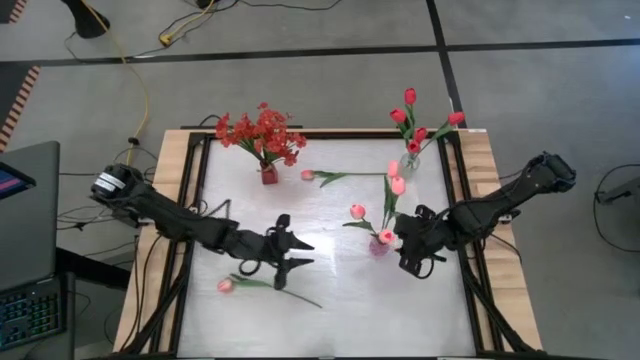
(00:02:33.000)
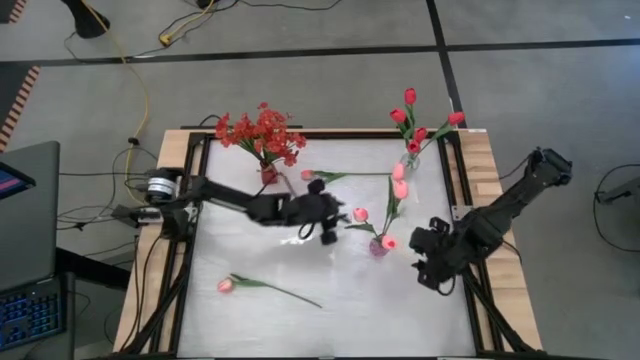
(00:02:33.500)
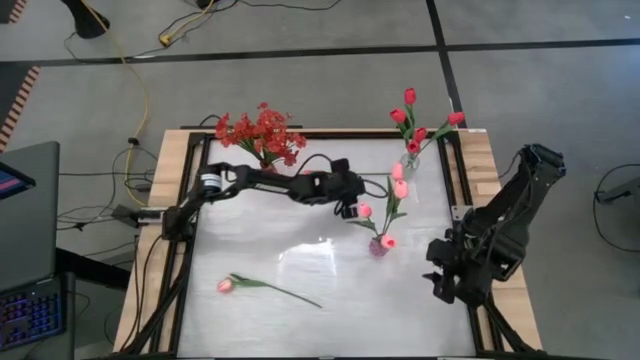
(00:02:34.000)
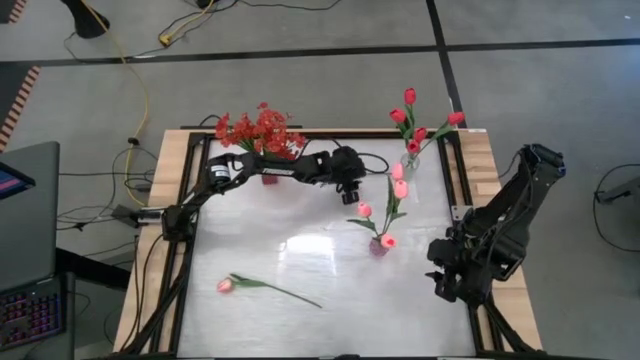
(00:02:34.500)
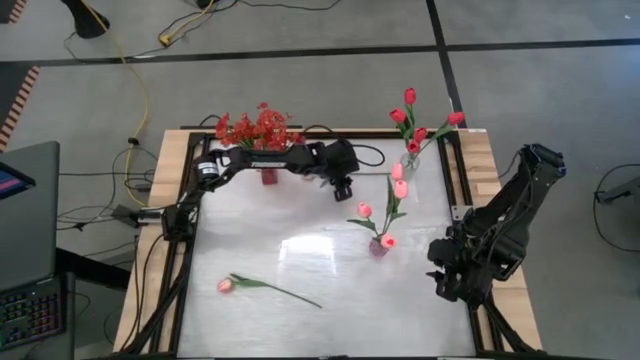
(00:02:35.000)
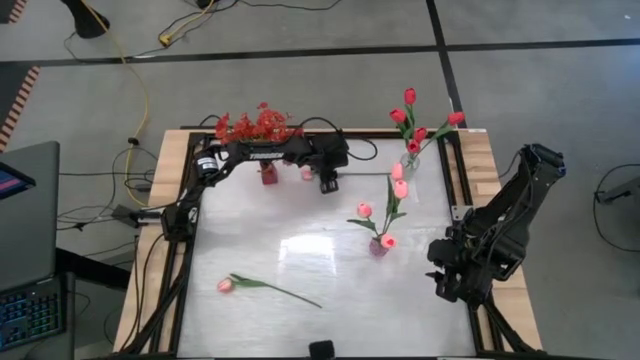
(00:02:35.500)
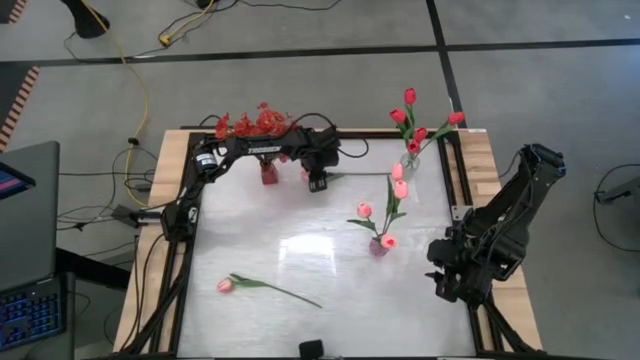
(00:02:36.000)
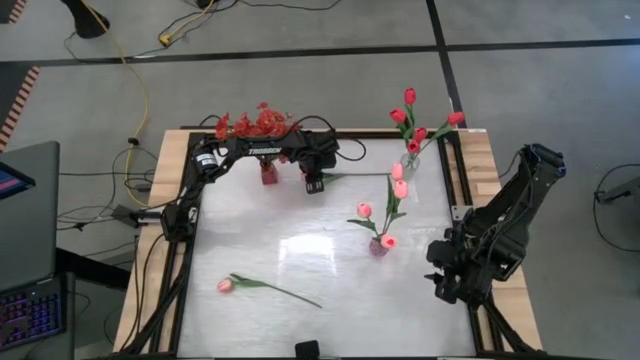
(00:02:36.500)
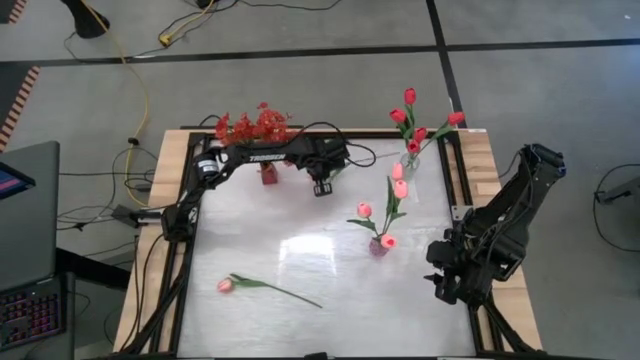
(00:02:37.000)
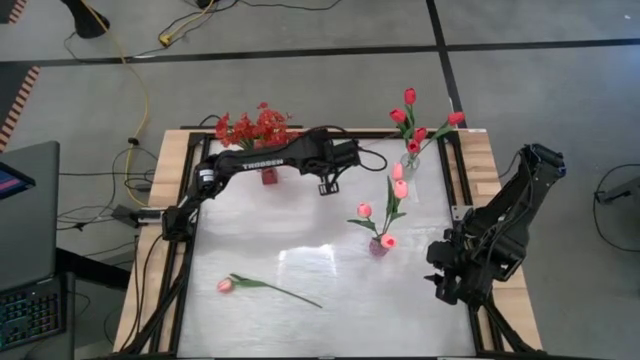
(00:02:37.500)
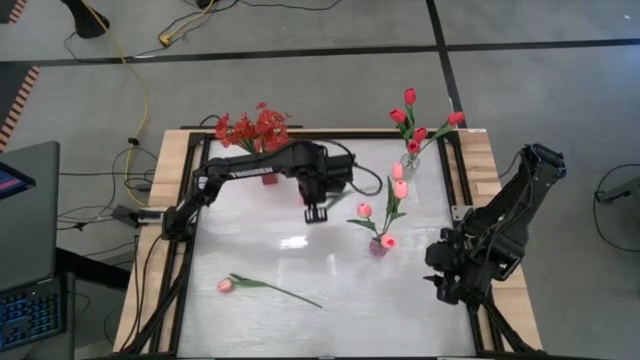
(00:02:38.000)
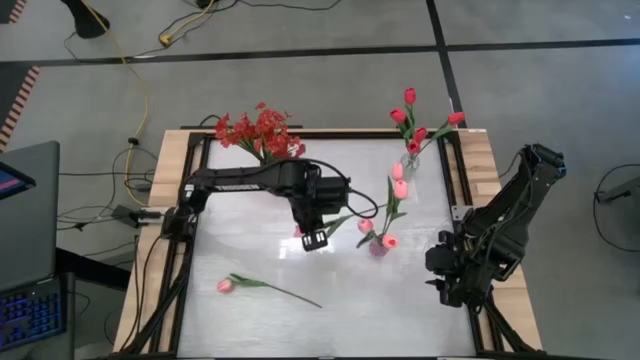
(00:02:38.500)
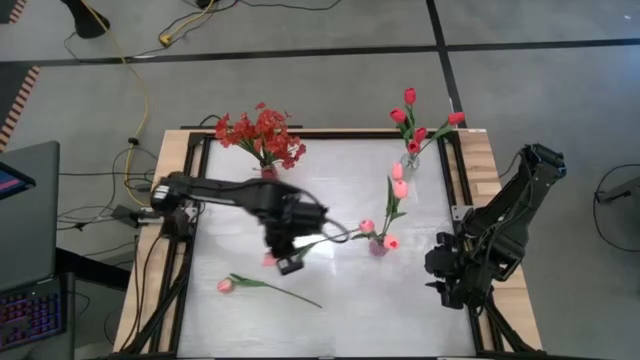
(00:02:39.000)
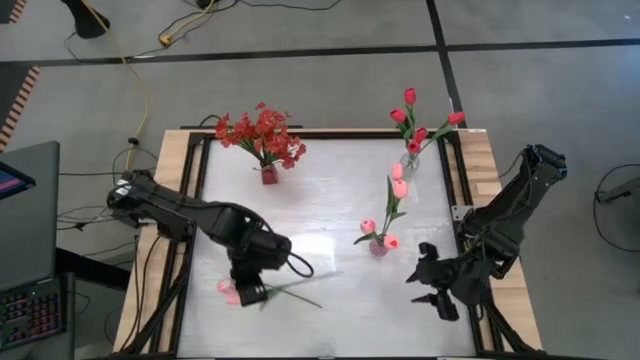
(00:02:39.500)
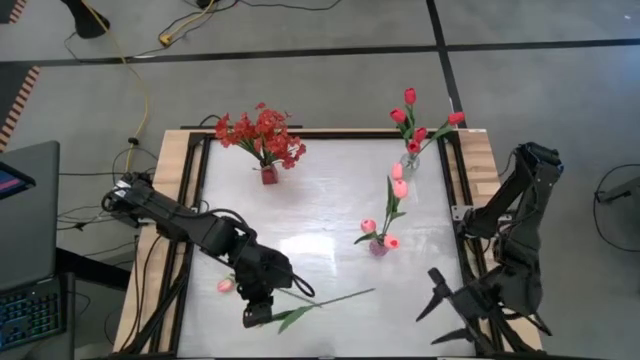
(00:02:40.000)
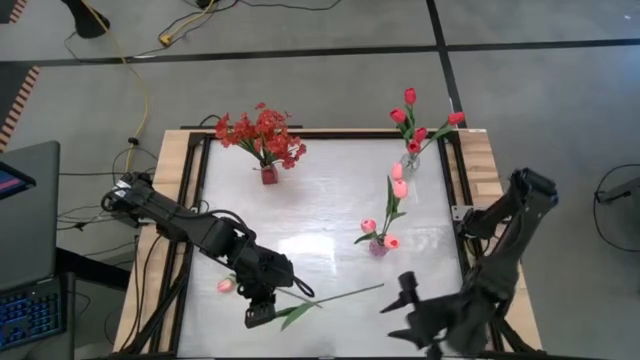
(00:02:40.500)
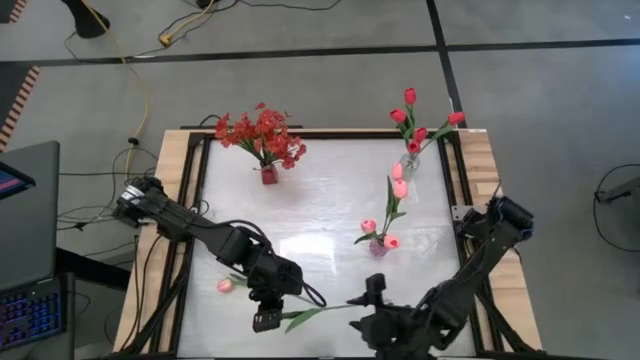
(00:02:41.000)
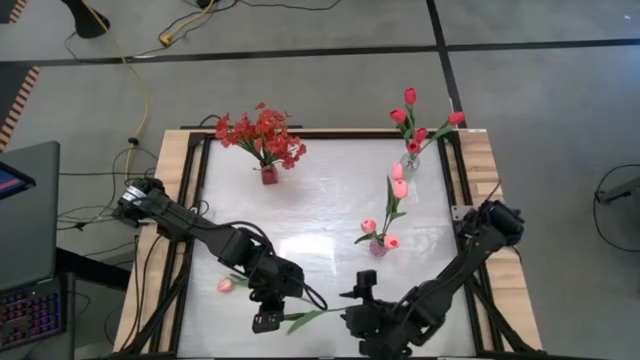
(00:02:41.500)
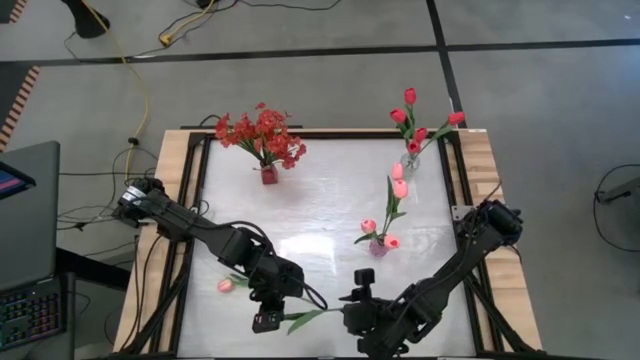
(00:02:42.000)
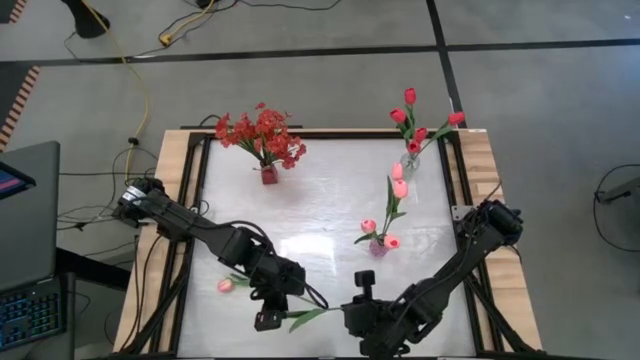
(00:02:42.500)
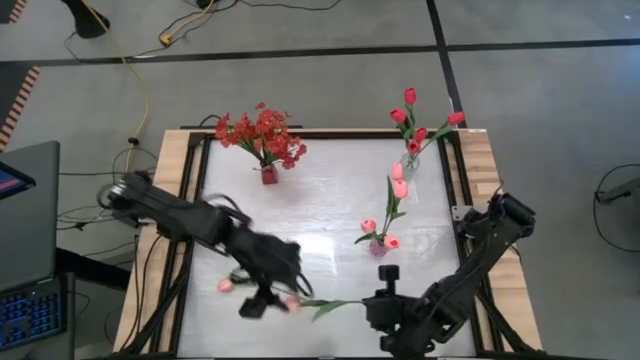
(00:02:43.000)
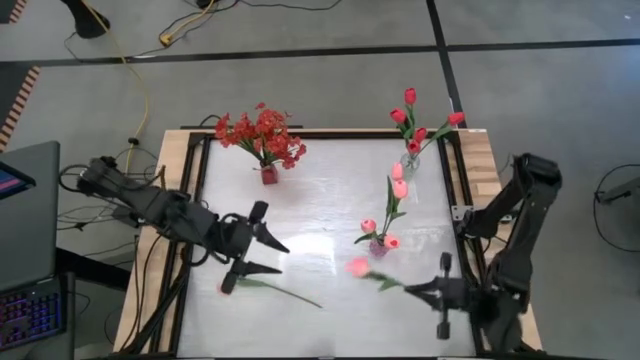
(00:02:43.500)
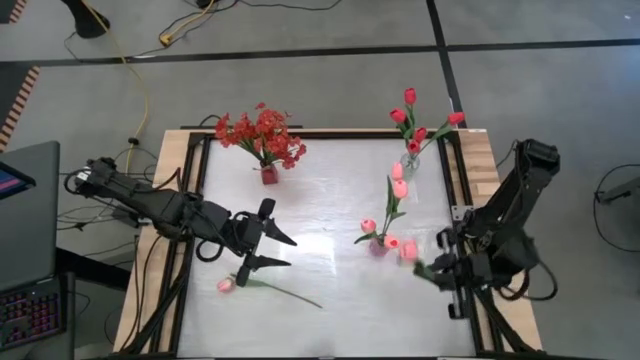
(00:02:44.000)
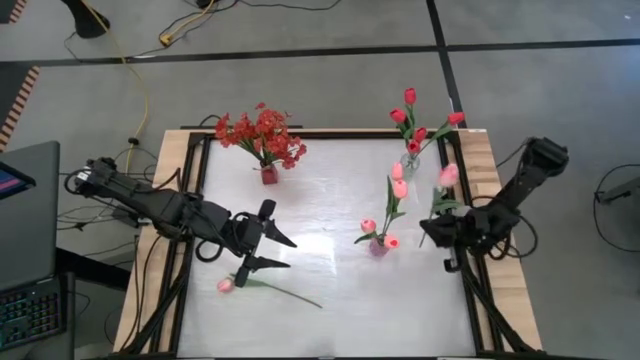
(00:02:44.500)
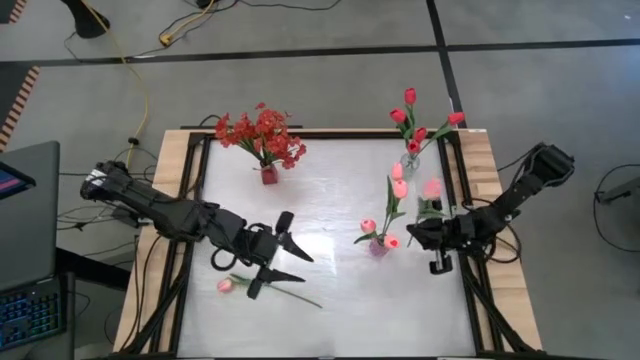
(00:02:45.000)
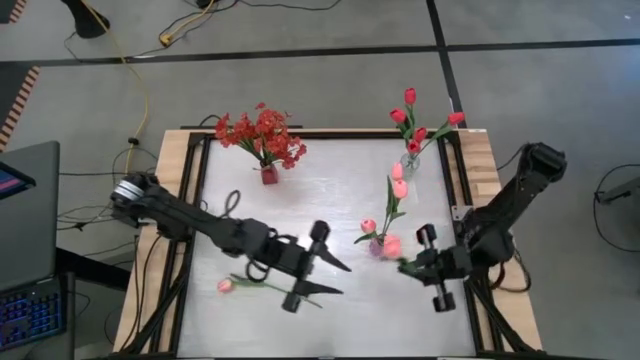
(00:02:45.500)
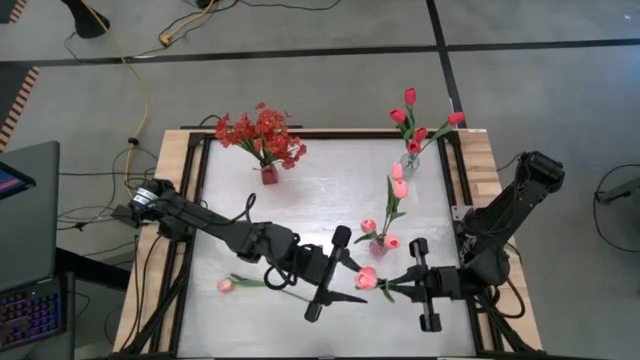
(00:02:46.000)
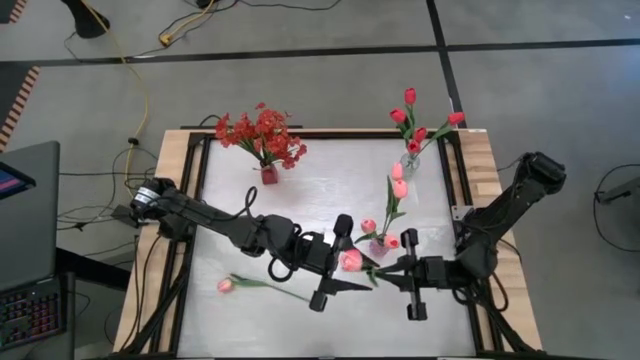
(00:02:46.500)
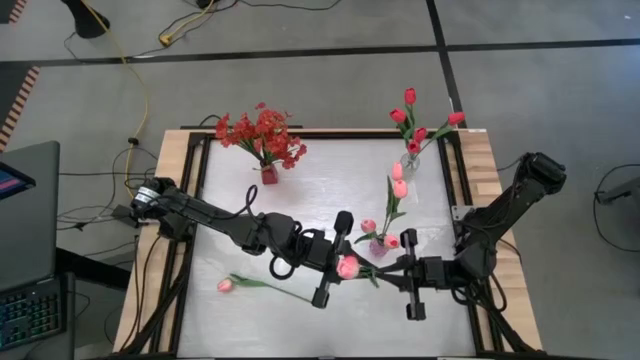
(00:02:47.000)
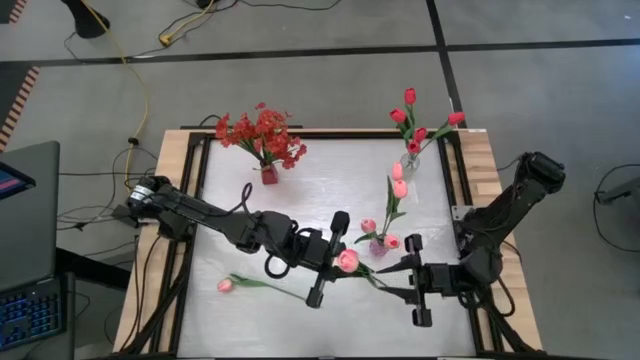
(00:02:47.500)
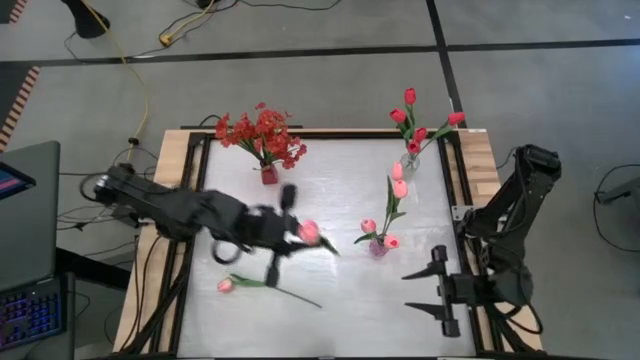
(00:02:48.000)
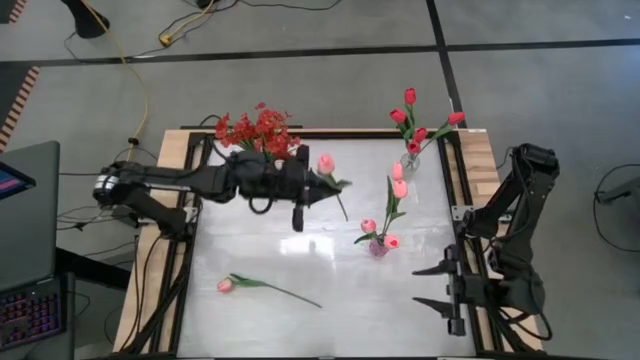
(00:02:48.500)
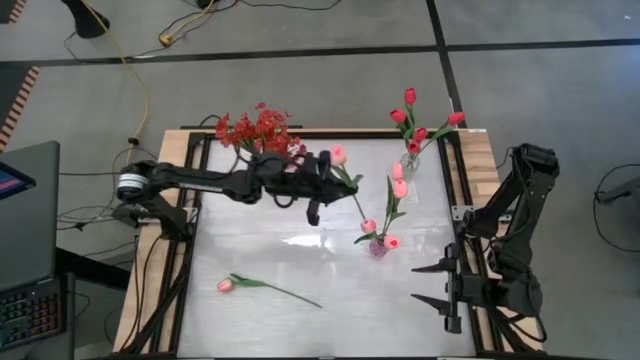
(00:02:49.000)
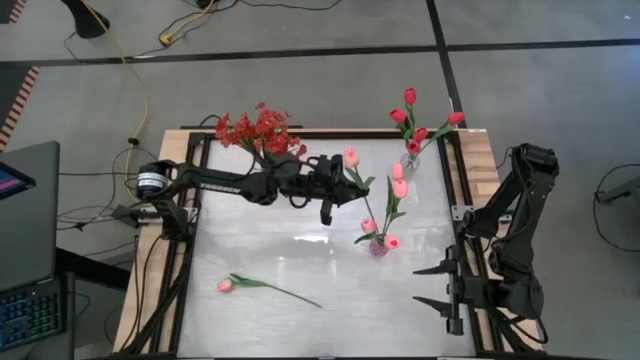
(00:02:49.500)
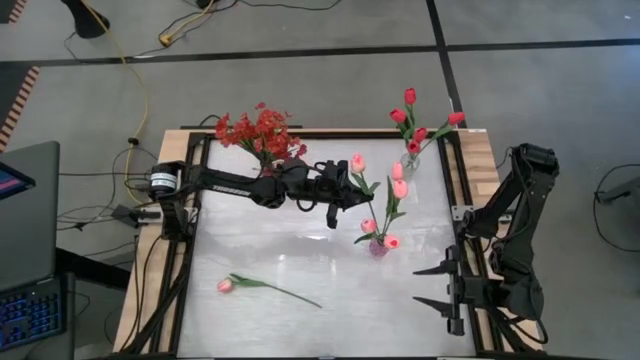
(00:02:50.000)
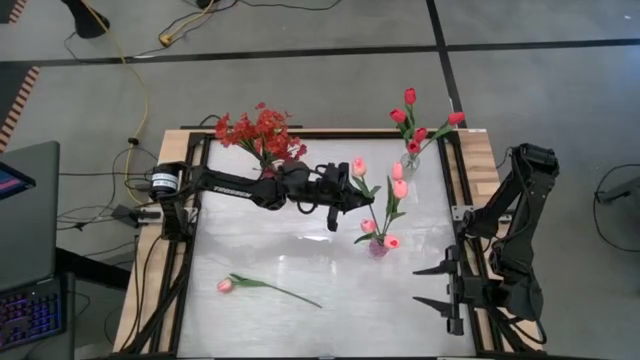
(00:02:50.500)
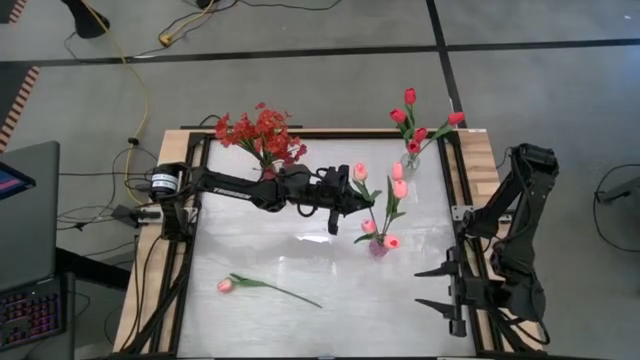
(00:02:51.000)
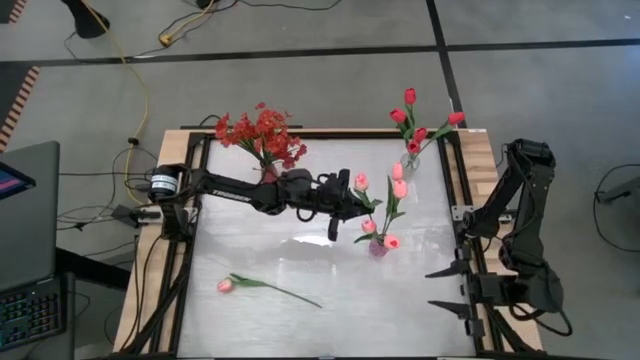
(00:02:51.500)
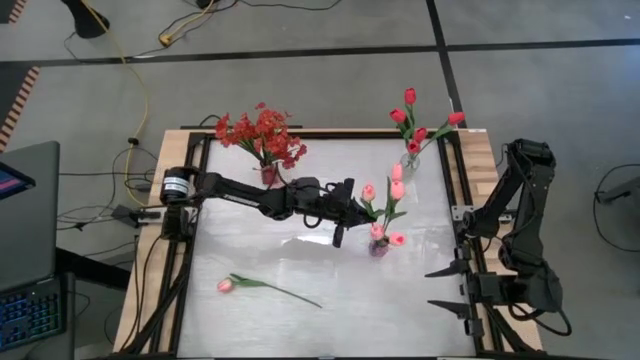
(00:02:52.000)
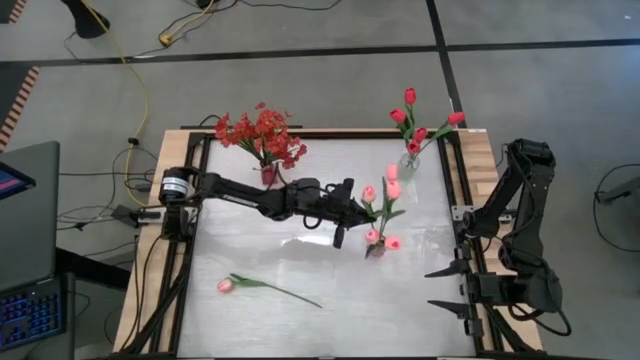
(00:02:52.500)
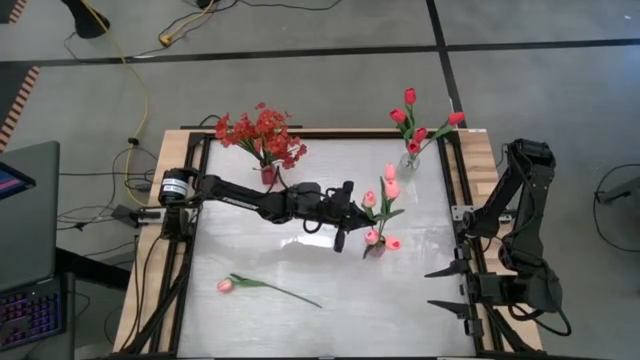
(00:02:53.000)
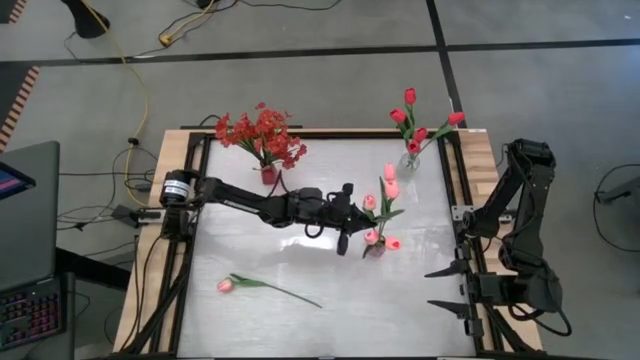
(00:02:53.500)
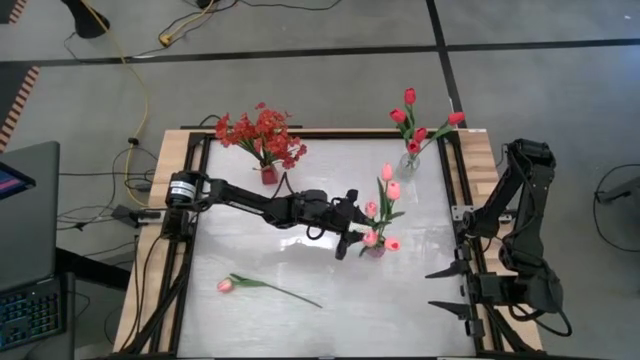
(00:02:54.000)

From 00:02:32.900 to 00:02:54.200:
Task: Sort flowers into vase by color
Put the pink tulip into the purple flower vase
